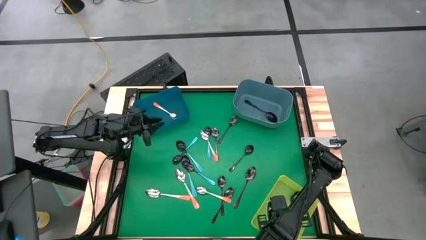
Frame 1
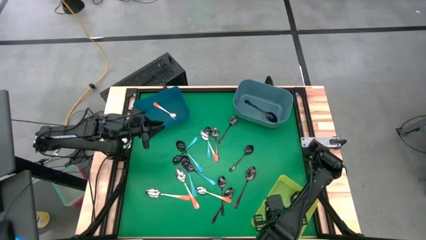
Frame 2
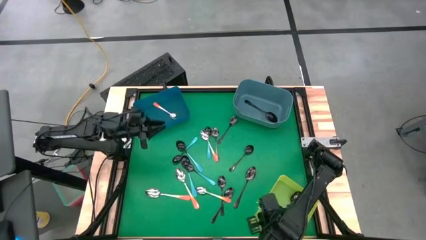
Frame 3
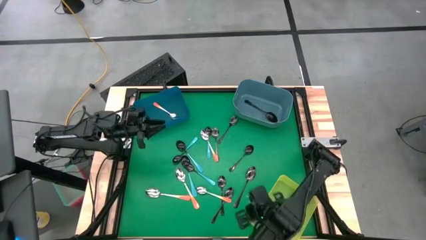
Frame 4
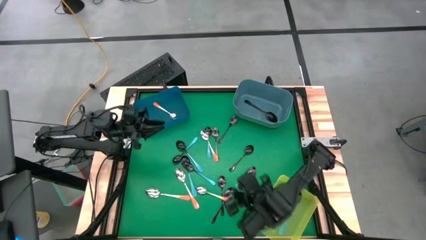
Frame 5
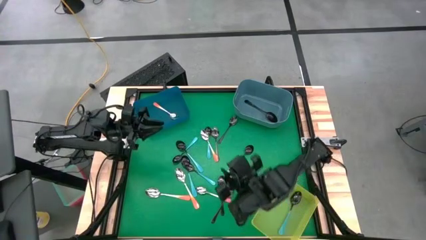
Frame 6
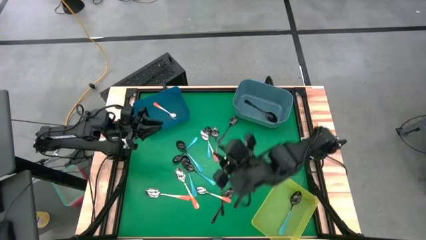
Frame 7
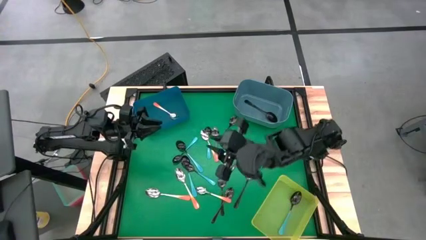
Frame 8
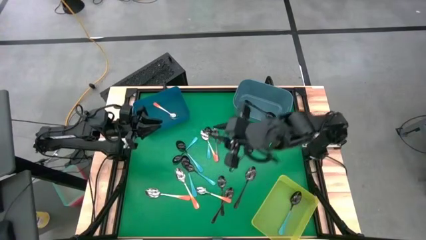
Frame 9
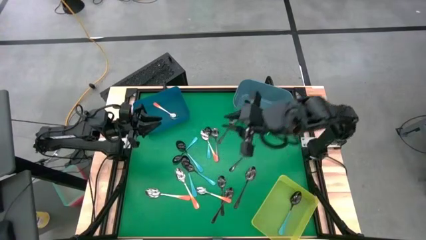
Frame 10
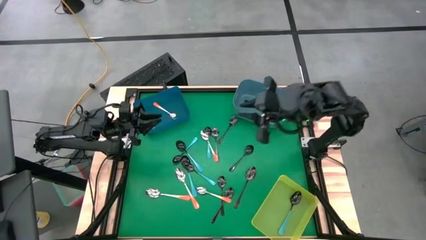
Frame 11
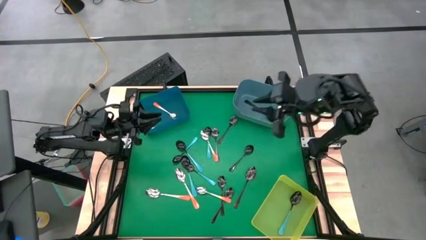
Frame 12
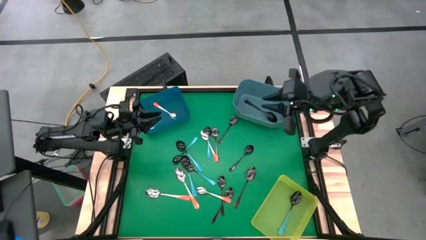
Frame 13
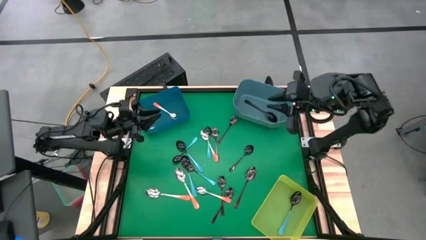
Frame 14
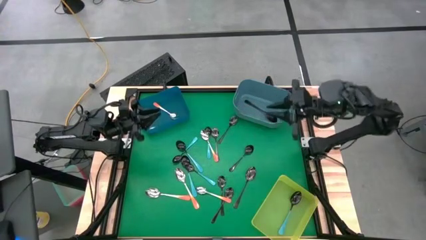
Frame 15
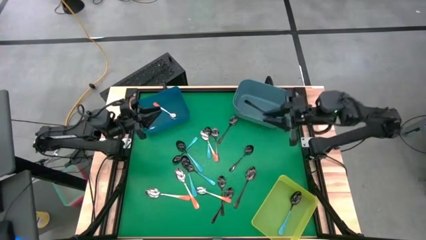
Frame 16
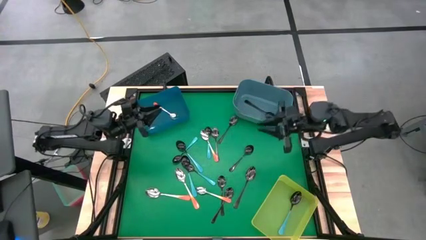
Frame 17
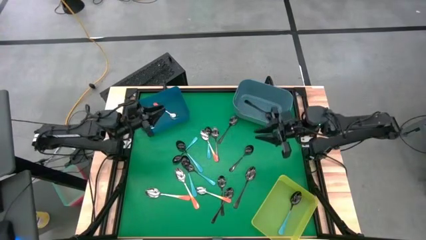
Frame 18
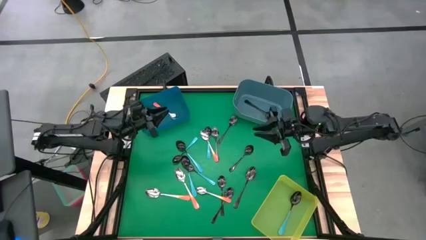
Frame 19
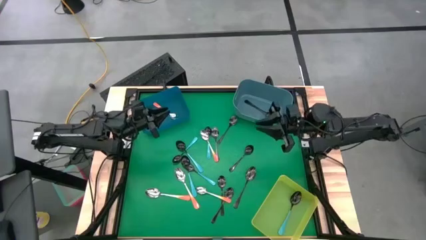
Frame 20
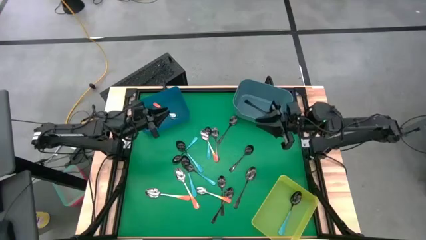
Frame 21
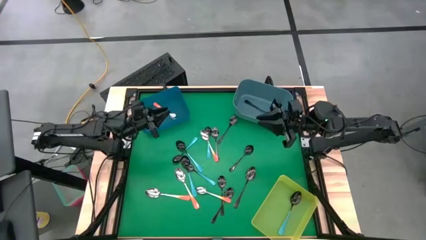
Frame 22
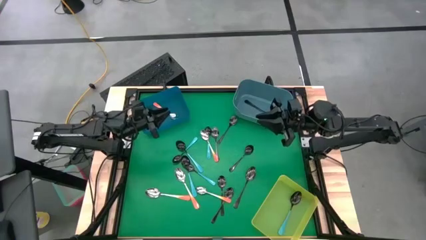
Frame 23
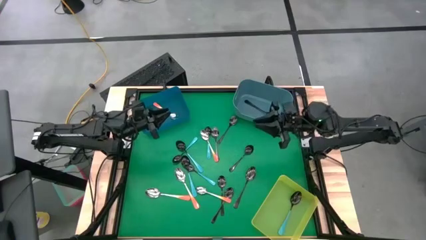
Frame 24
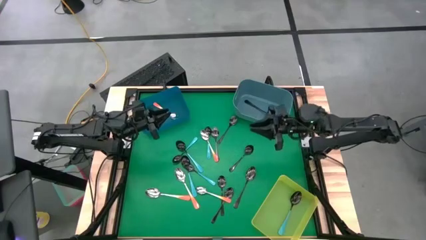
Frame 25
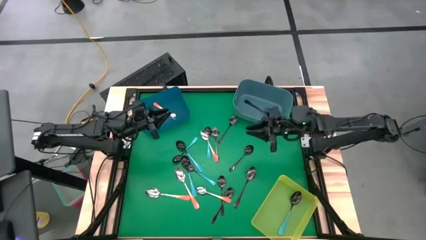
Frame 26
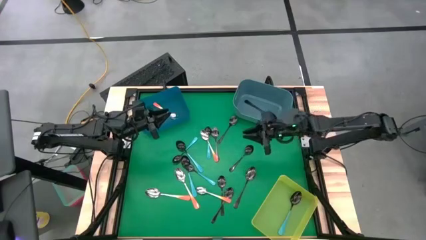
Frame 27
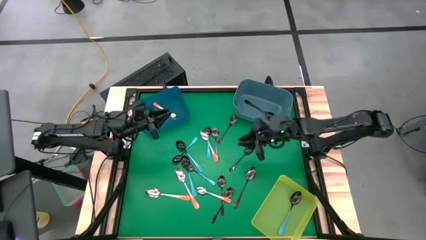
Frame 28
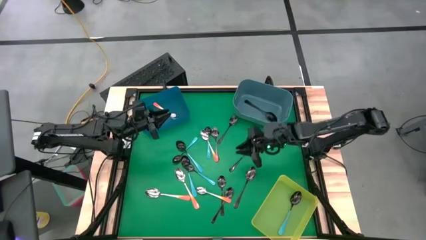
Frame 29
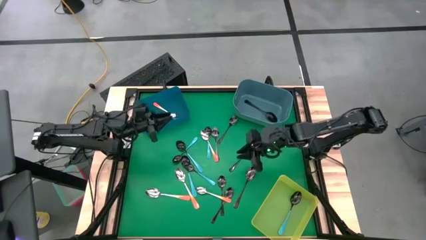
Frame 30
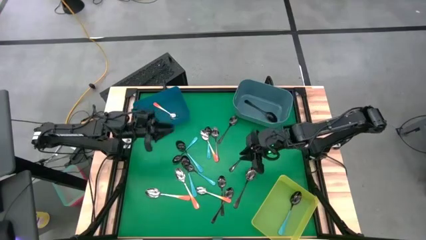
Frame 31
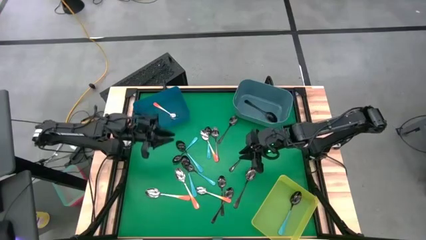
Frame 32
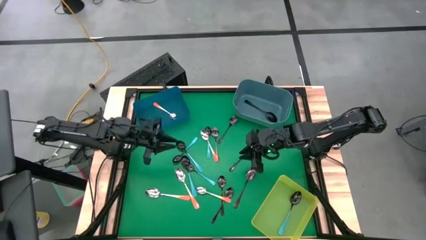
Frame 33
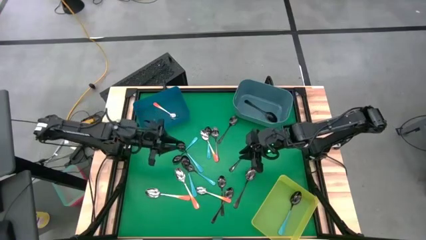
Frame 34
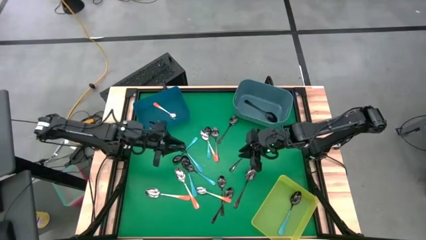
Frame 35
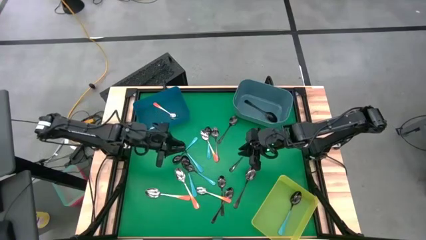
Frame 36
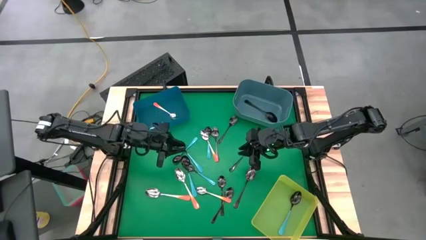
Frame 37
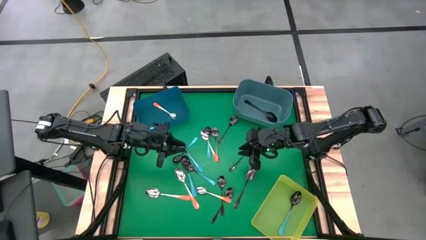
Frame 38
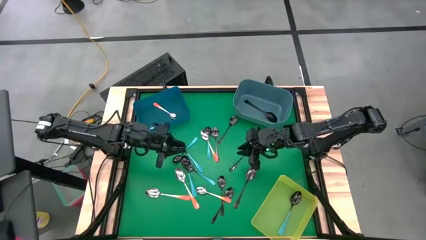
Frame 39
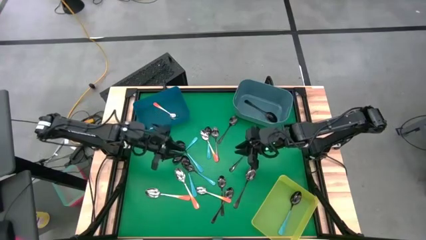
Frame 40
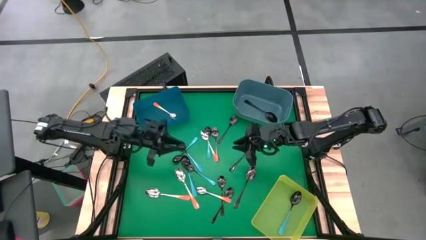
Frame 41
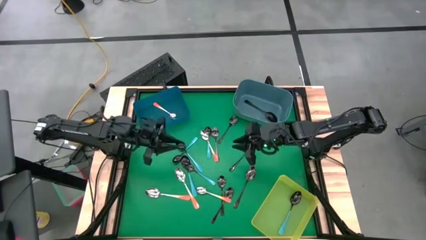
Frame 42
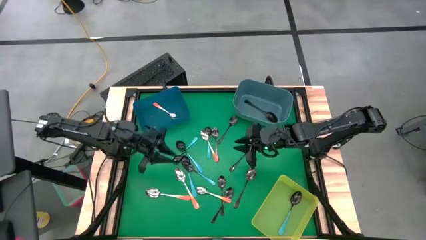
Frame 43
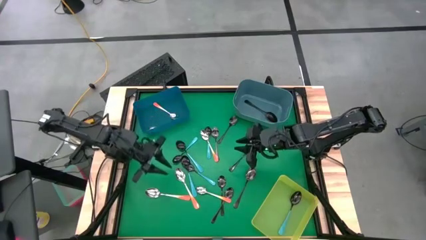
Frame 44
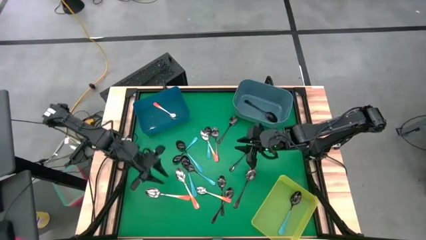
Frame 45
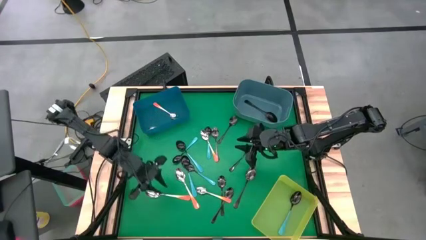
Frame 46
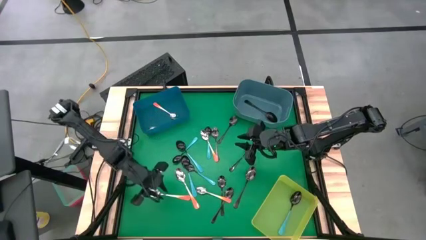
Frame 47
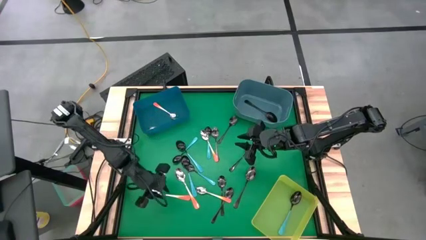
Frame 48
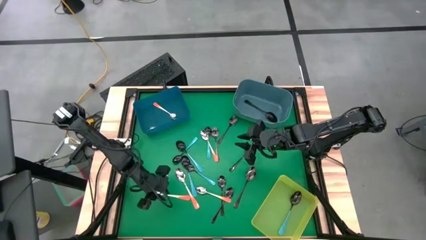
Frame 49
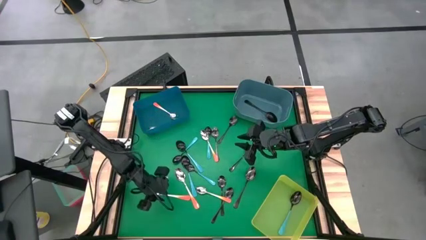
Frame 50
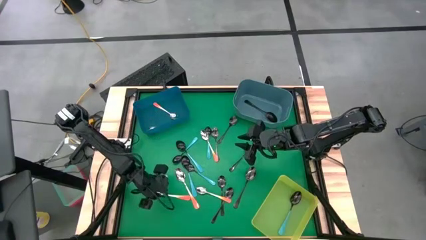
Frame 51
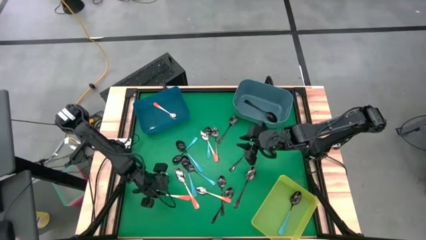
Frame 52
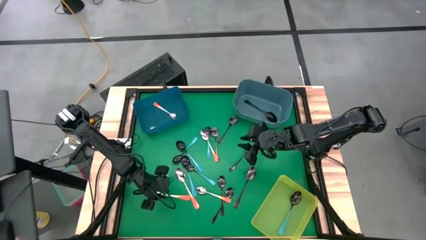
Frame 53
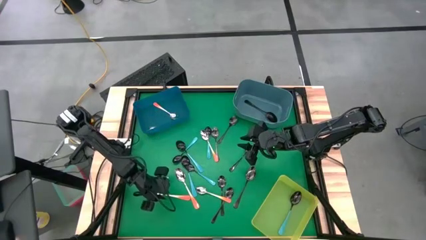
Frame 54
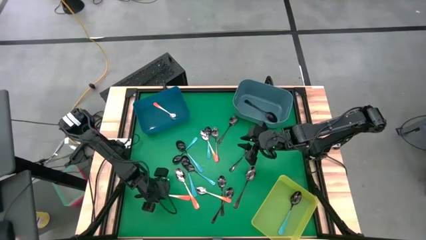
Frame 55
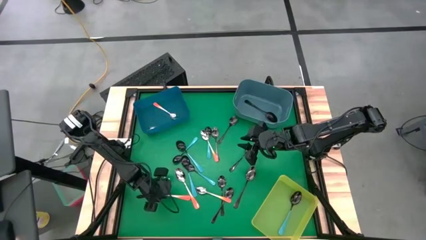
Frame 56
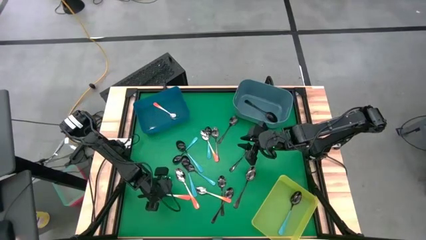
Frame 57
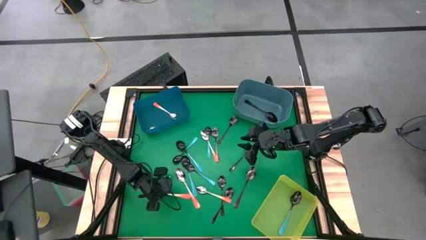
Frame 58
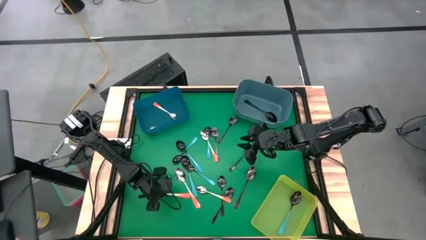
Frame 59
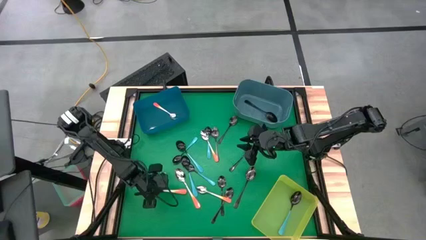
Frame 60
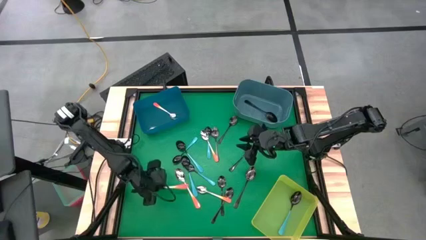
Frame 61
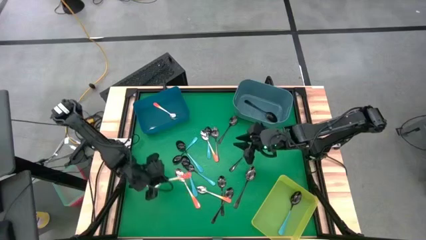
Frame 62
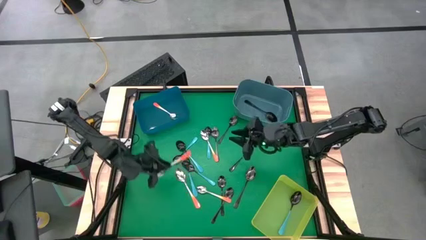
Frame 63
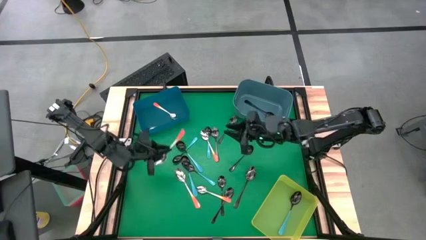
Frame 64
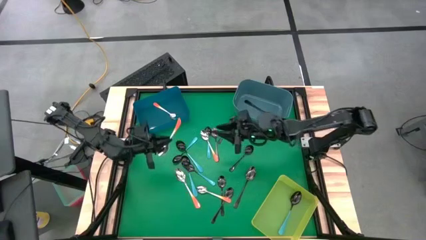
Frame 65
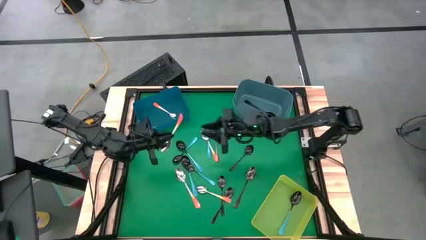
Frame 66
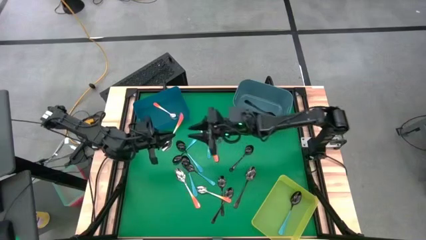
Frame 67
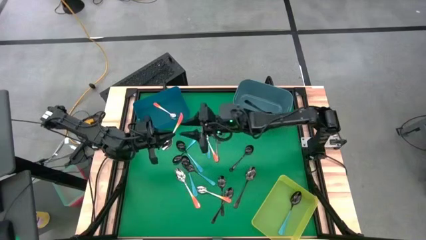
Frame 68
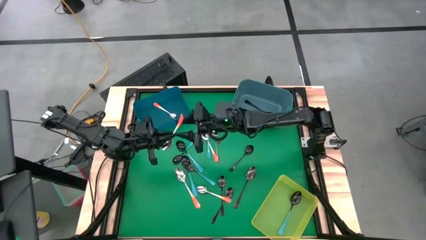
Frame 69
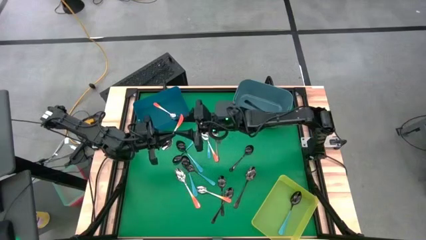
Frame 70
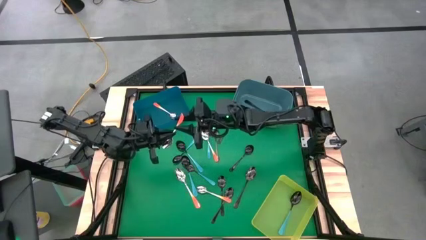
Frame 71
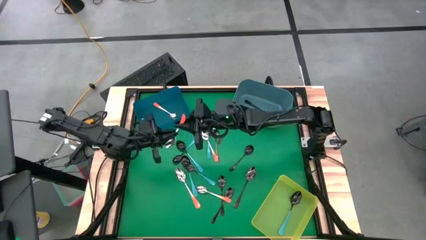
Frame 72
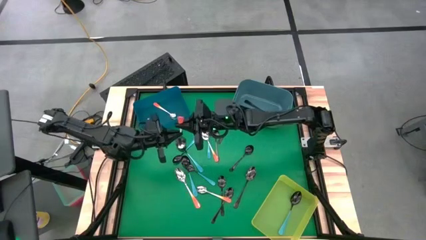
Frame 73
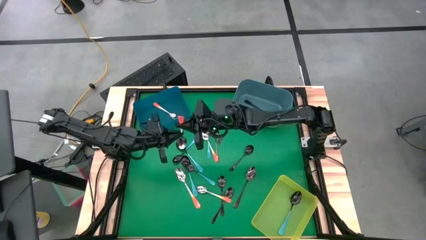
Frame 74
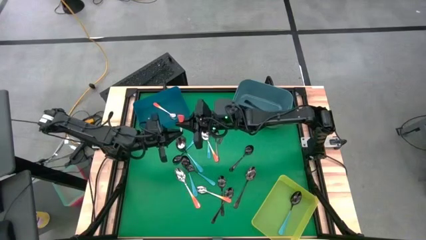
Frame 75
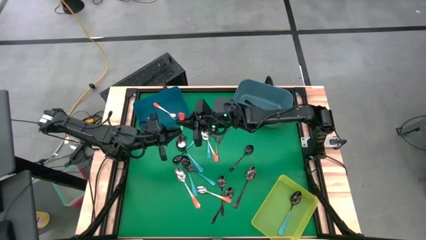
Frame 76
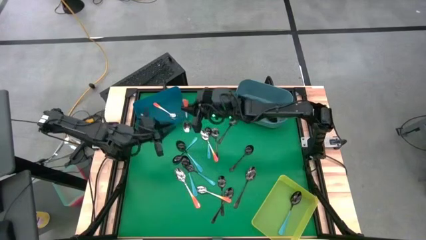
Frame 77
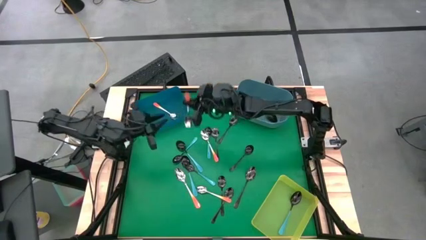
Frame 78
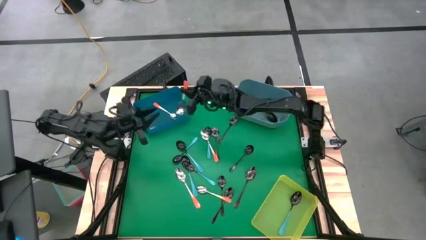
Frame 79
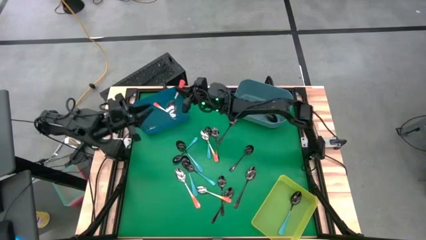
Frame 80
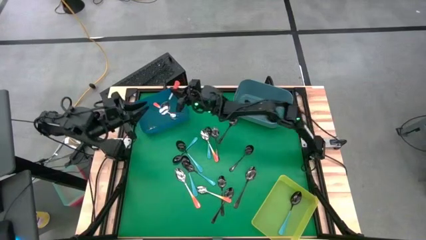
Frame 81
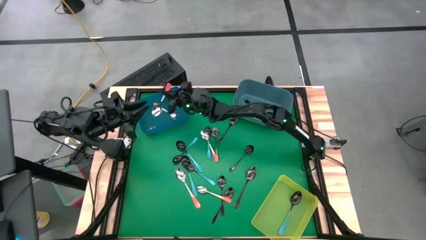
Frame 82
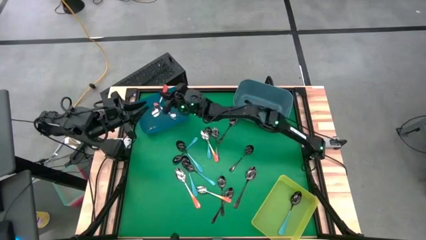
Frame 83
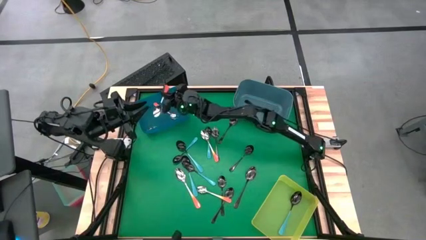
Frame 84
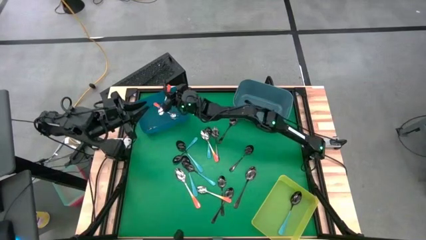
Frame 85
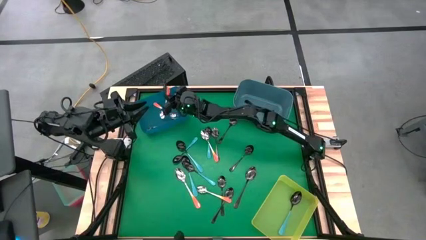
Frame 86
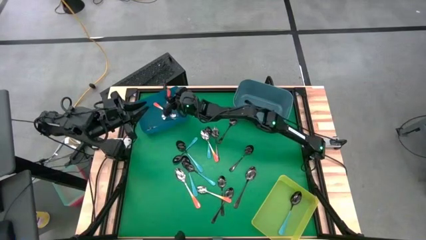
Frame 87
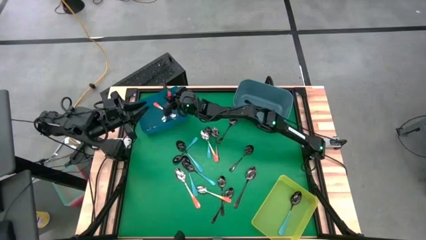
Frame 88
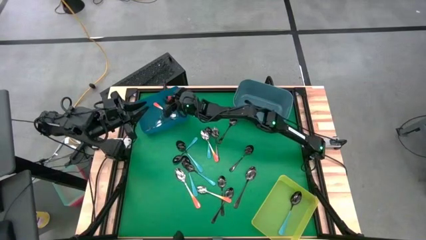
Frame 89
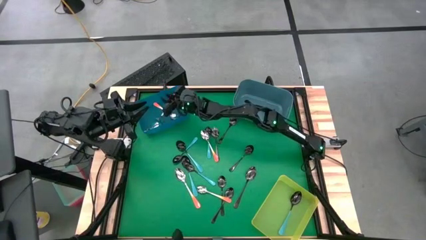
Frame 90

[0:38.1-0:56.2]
Task: Sort silverware by color (type)
Put the orange spoon into the dark blue bin
